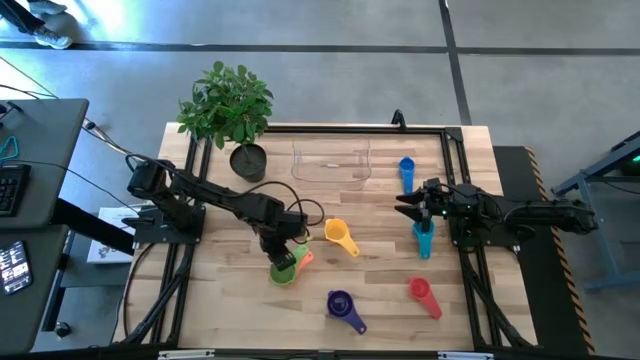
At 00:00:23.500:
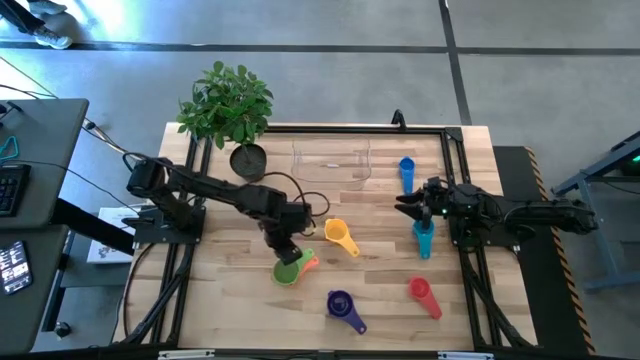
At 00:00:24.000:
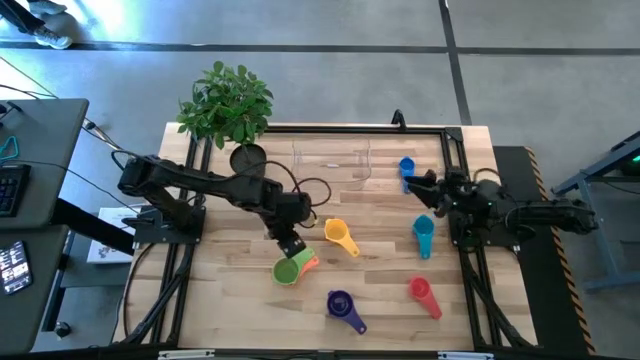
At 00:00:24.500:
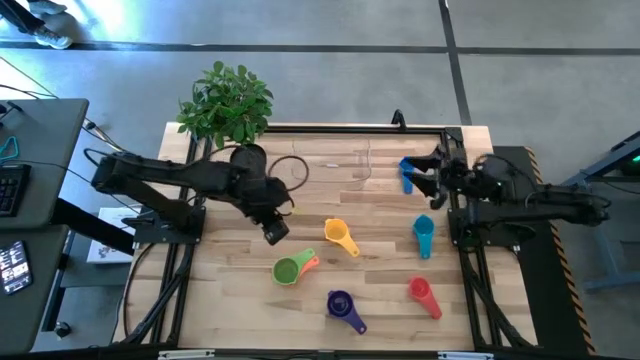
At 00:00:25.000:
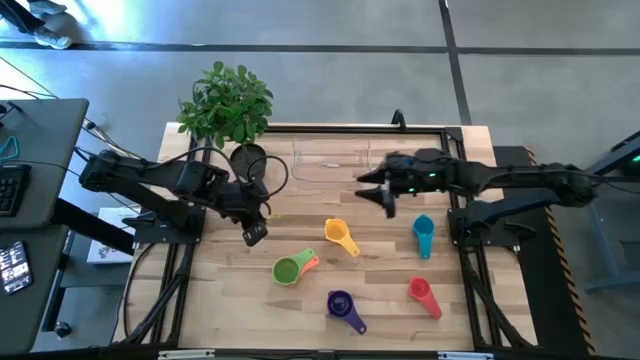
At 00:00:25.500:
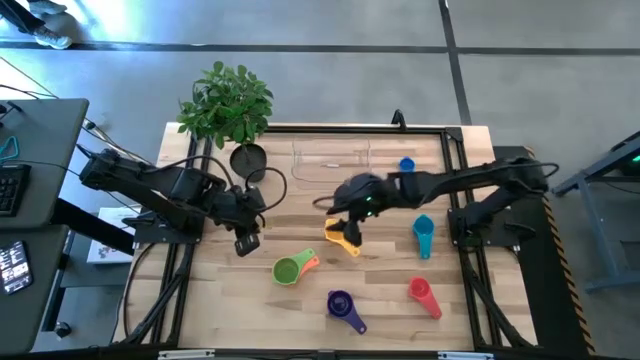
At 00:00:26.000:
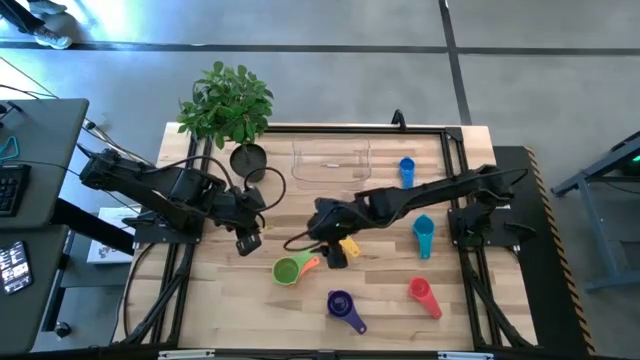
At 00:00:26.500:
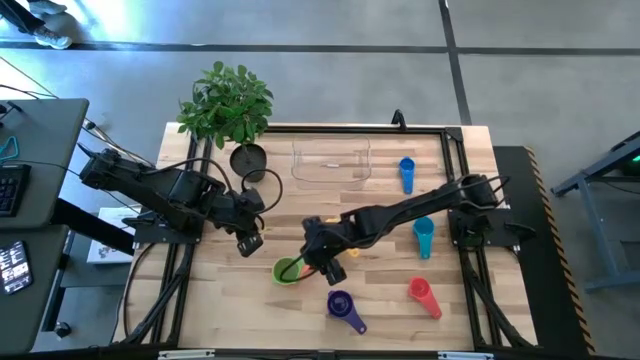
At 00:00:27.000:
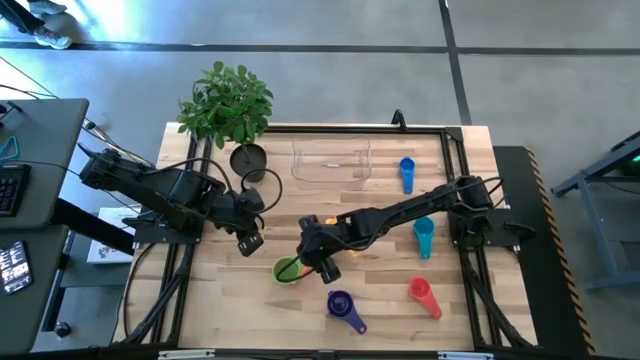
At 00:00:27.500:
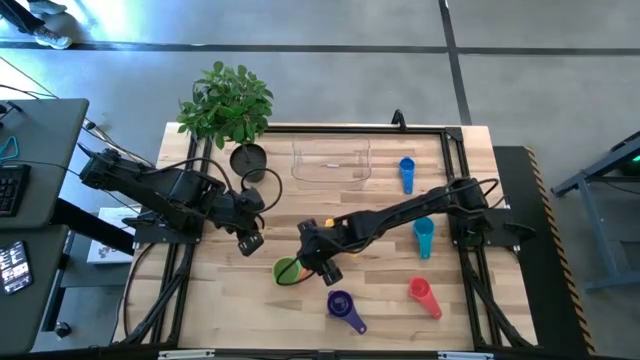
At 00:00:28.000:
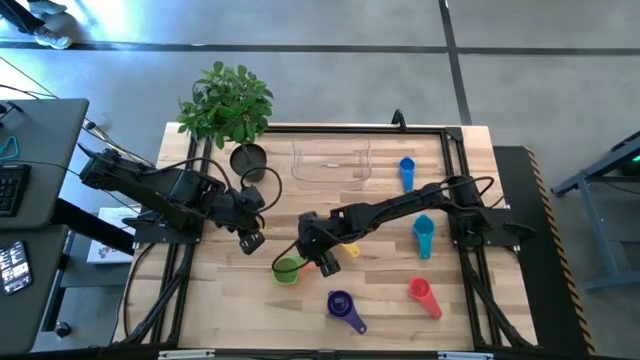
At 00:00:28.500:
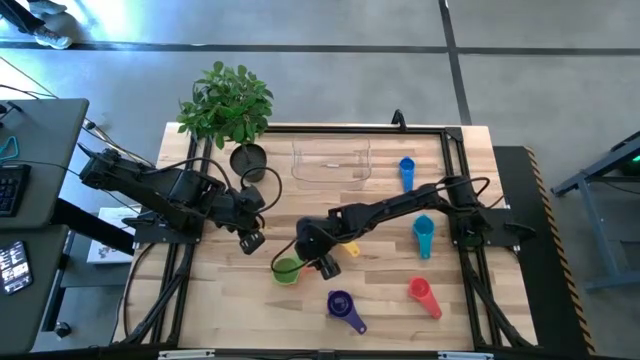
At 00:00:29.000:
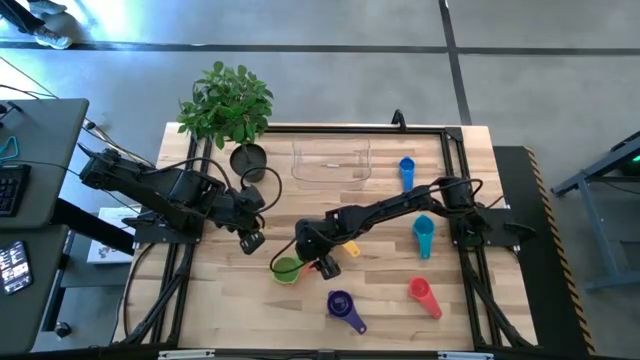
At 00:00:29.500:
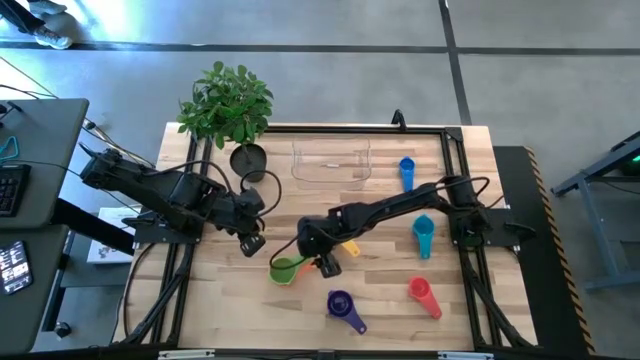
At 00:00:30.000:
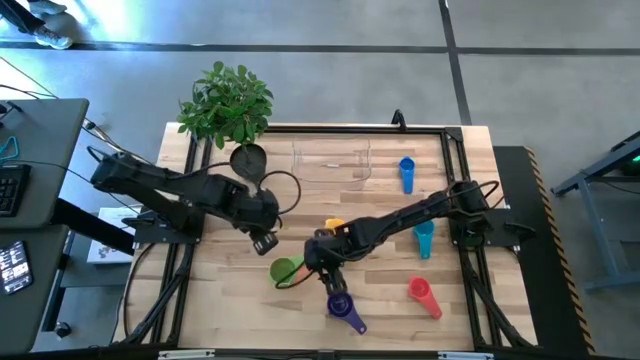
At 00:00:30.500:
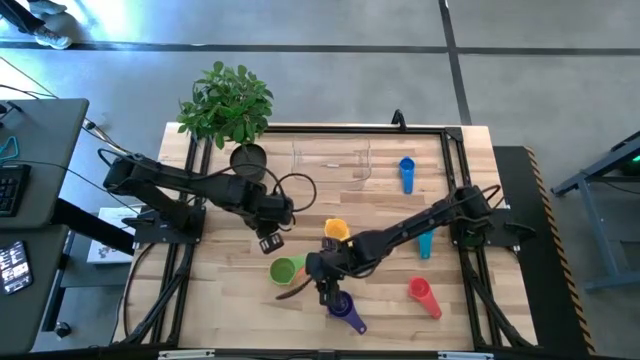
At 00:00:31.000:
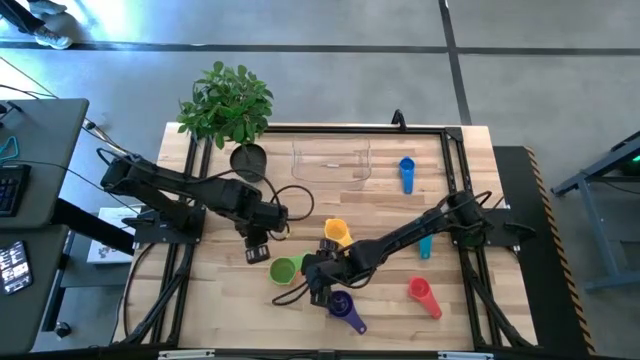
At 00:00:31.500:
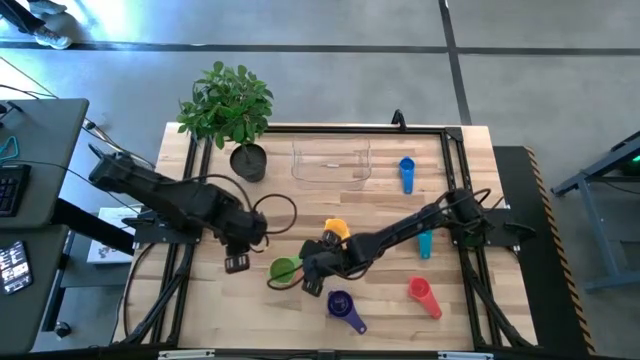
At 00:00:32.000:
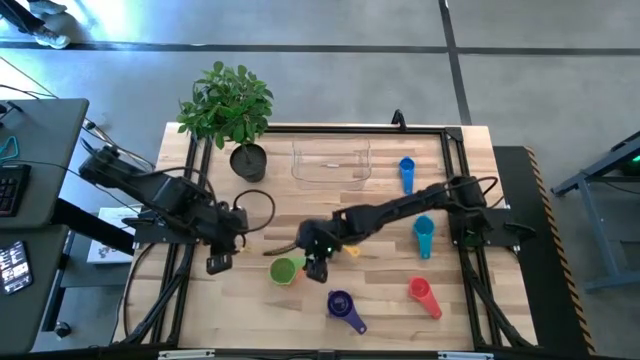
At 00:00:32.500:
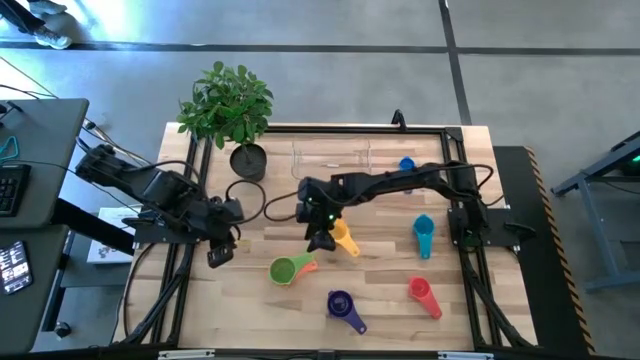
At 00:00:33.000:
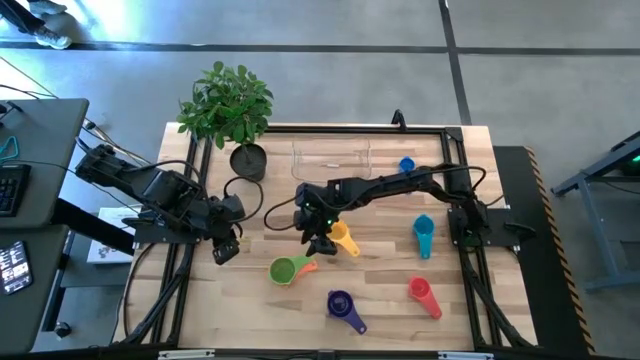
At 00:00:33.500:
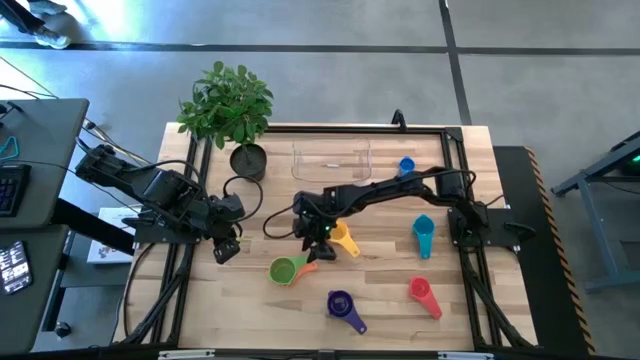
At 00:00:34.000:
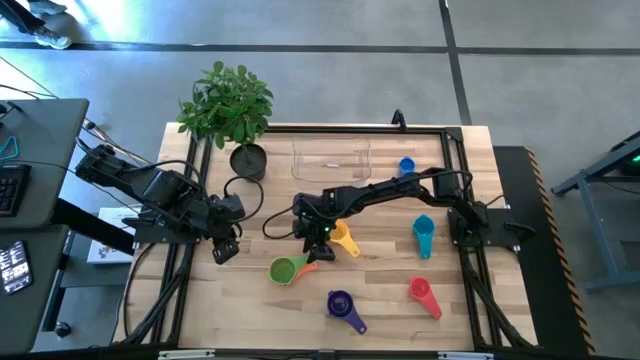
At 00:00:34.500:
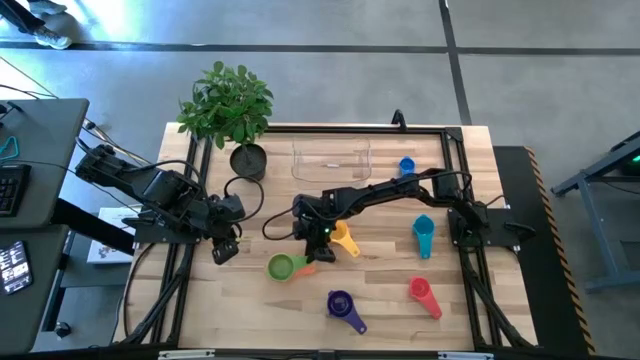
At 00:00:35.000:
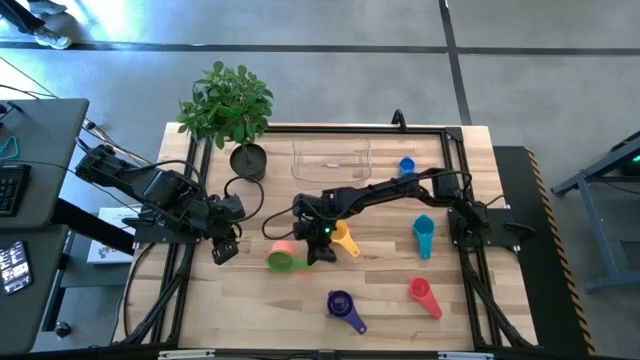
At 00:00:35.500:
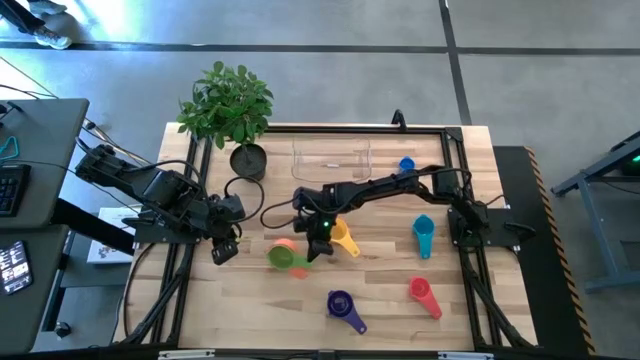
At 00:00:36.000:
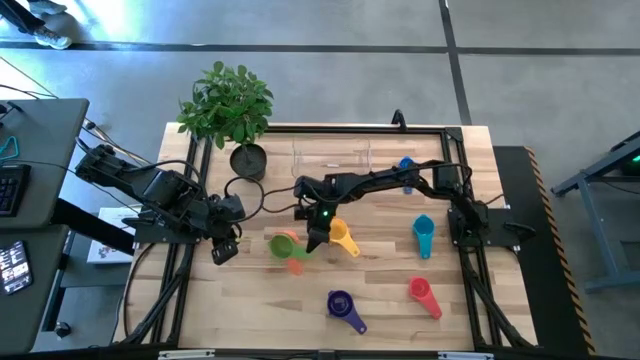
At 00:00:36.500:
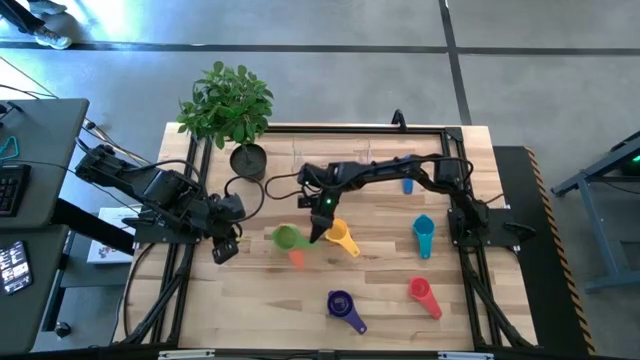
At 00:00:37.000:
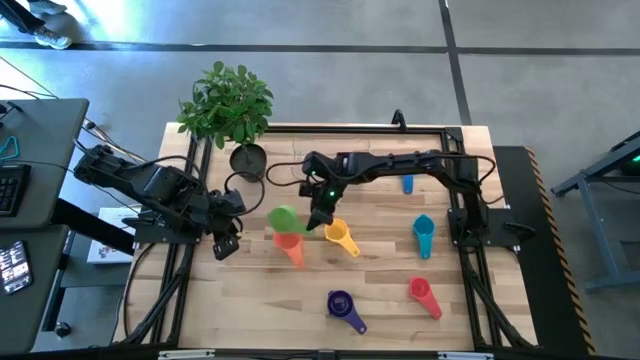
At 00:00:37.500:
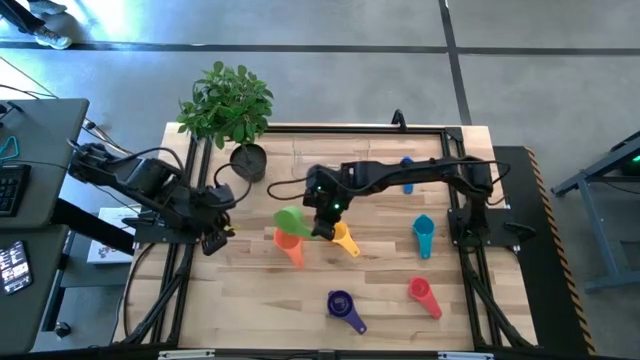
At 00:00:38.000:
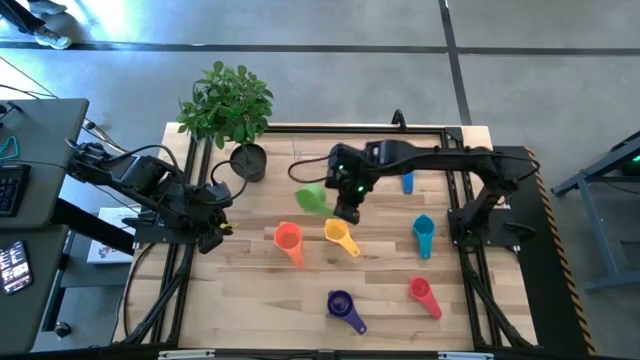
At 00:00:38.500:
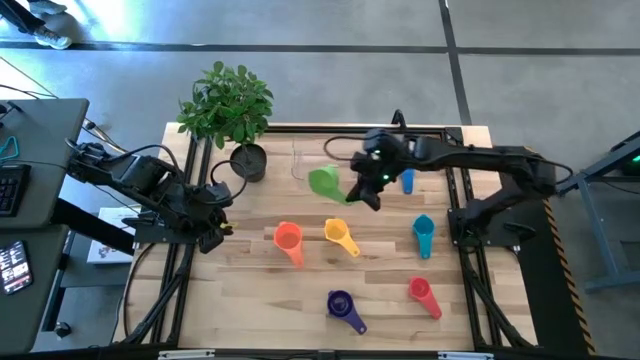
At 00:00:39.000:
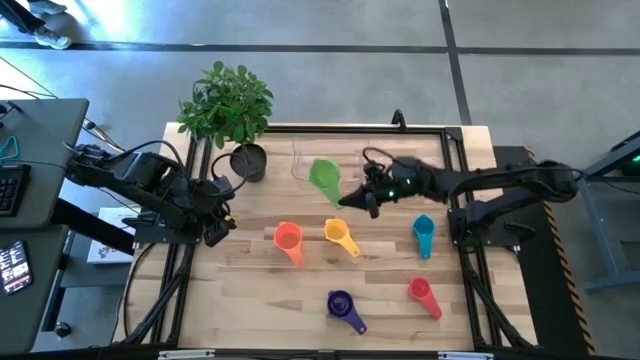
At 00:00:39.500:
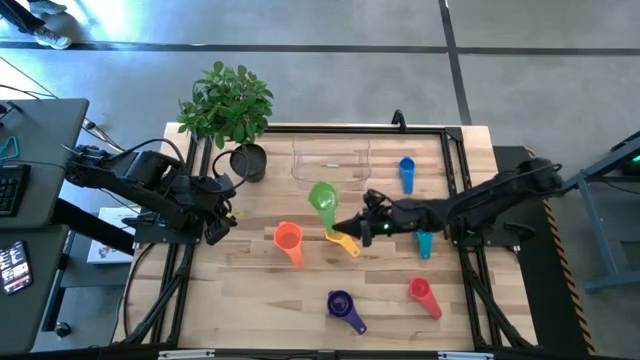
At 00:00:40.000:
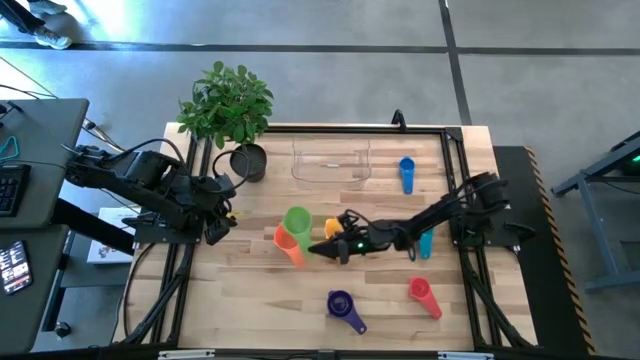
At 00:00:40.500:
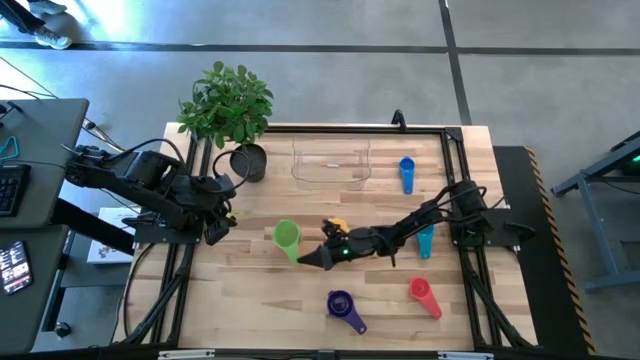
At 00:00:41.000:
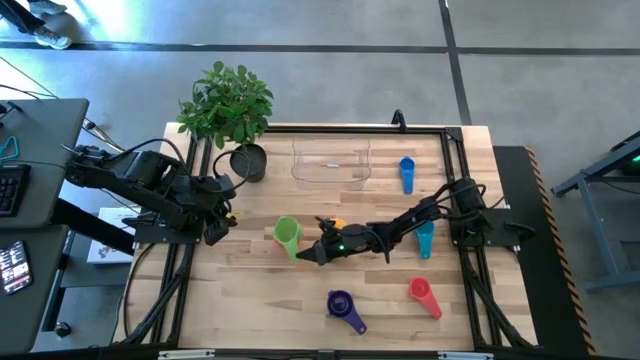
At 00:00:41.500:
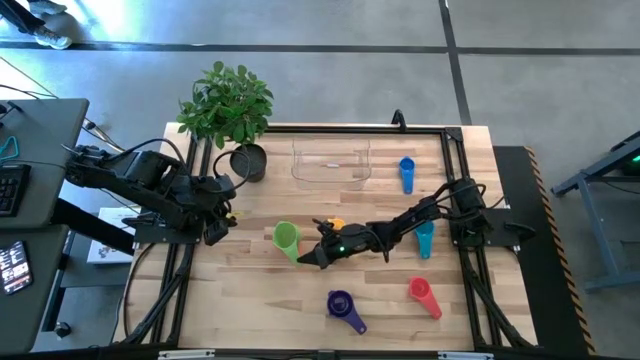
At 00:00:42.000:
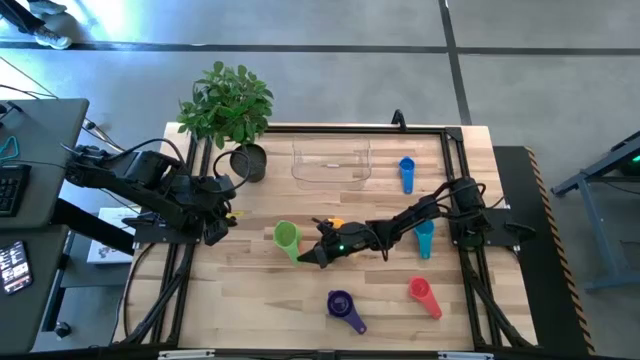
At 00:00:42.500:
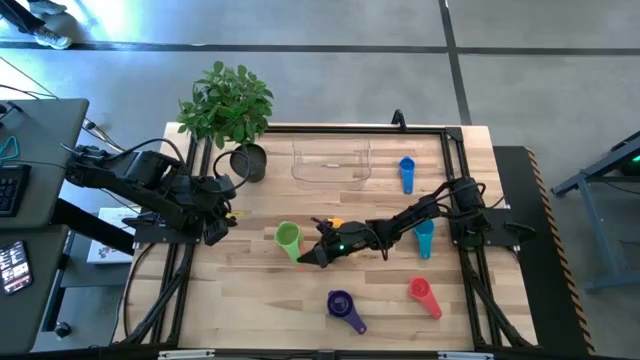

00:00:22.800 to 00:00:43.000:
Task: Nest measuring cups in basket
Stack the green measuring cup on top of the orange measuring cup
